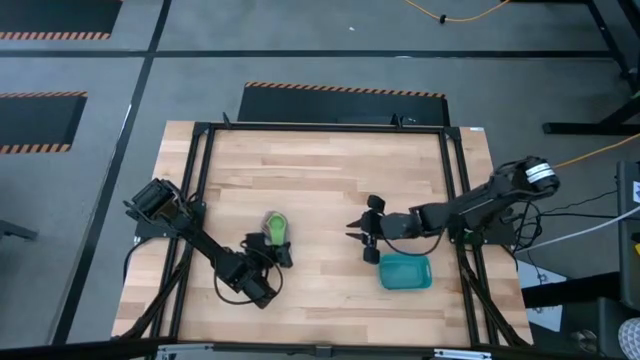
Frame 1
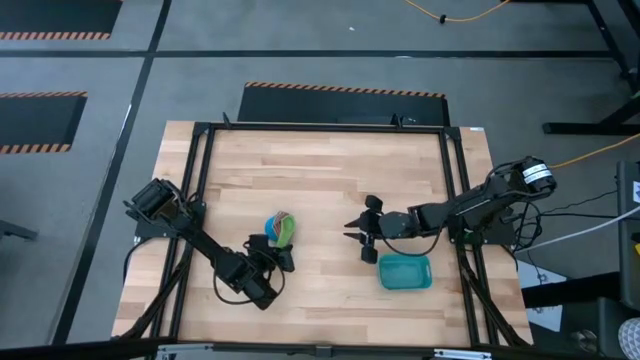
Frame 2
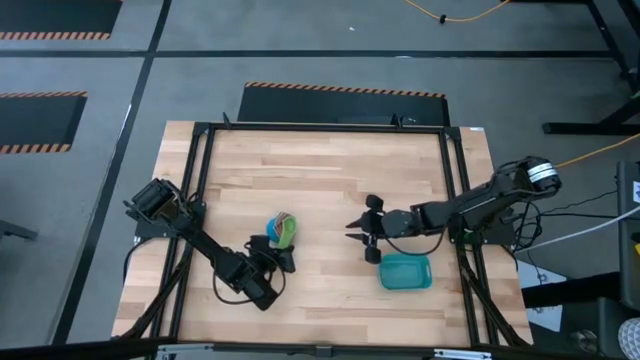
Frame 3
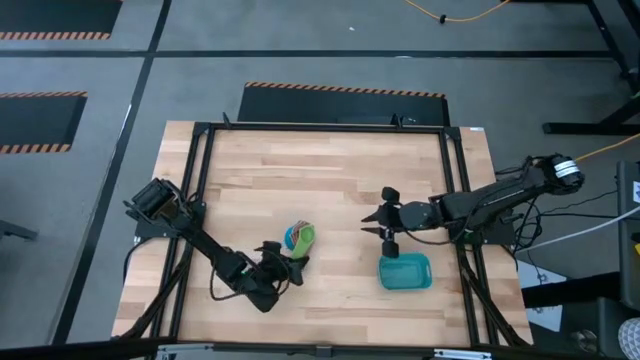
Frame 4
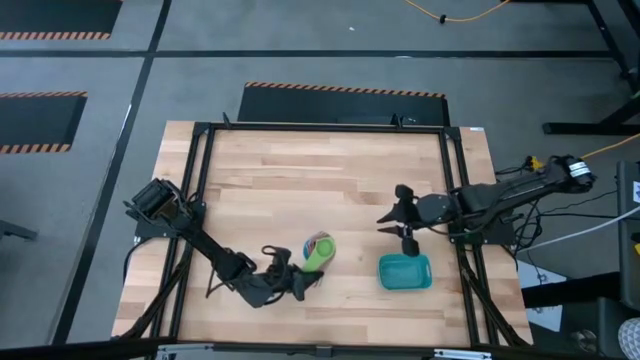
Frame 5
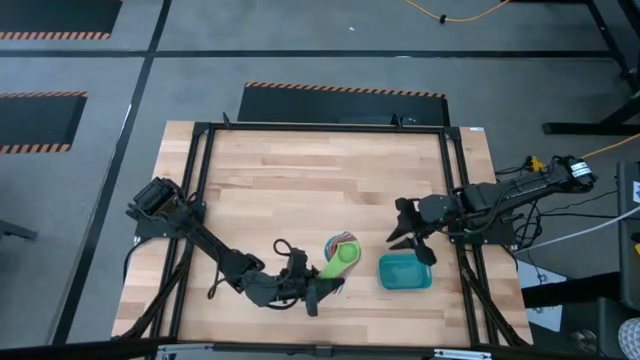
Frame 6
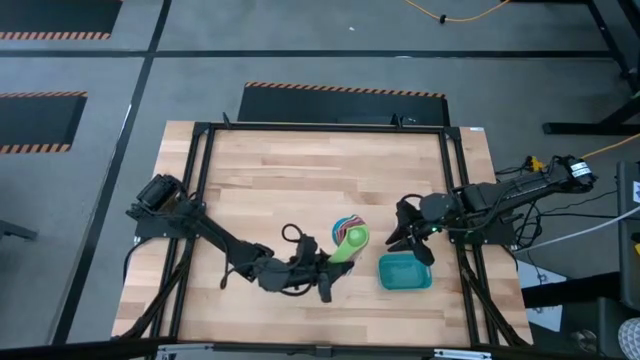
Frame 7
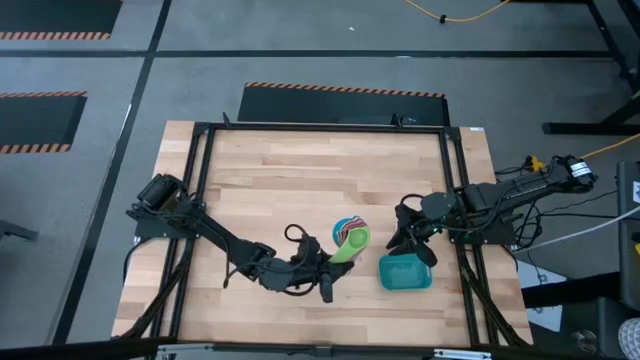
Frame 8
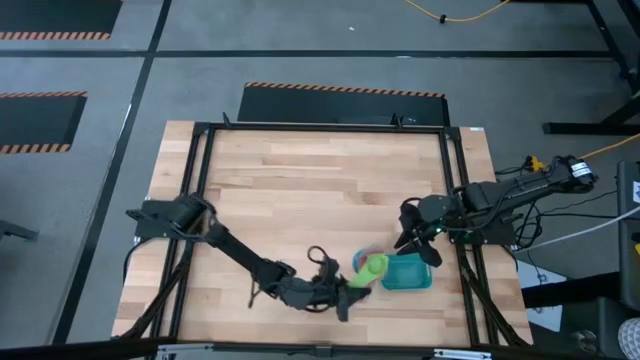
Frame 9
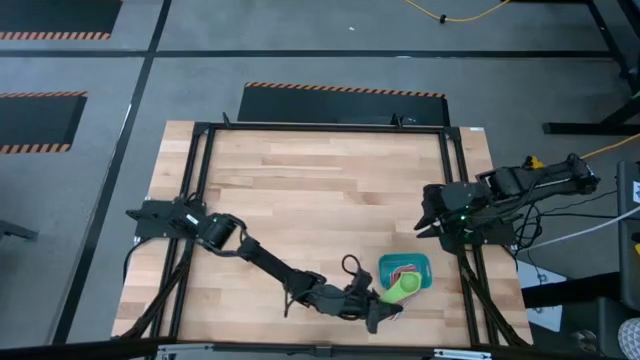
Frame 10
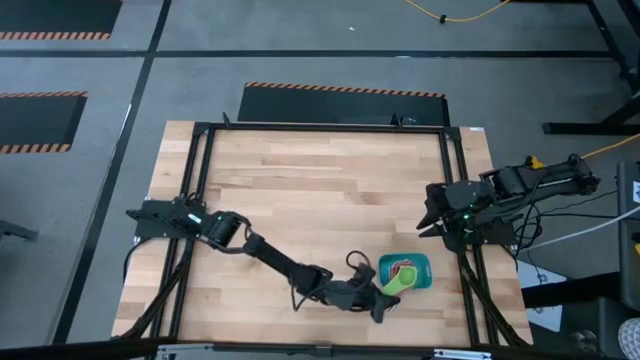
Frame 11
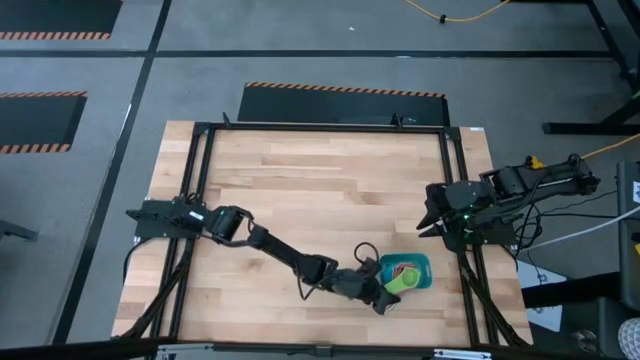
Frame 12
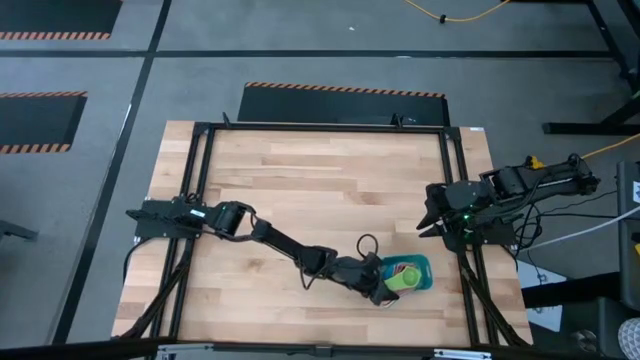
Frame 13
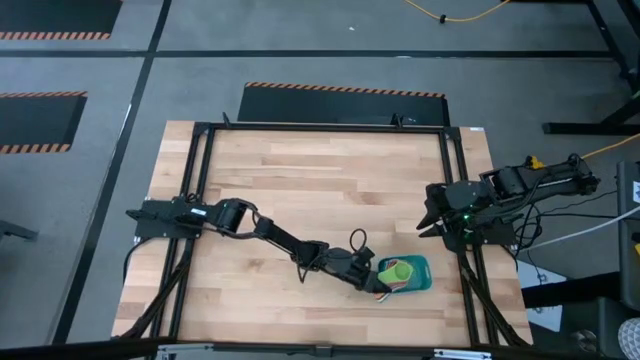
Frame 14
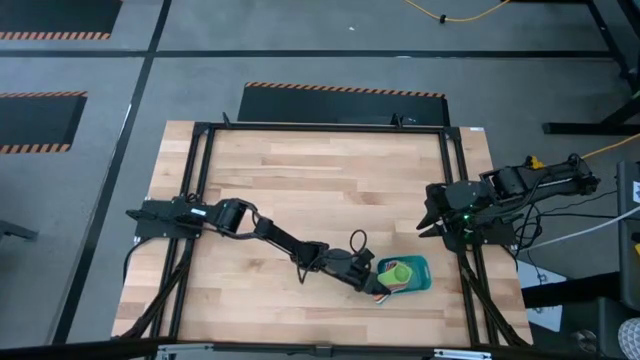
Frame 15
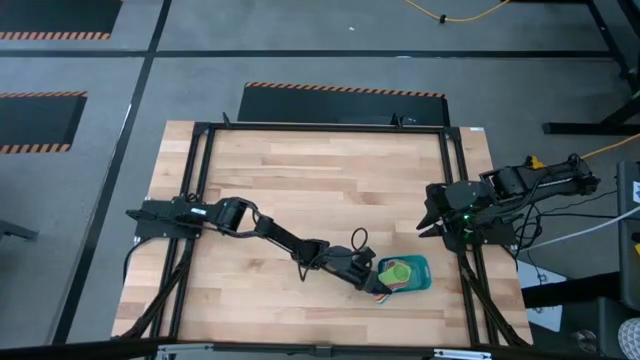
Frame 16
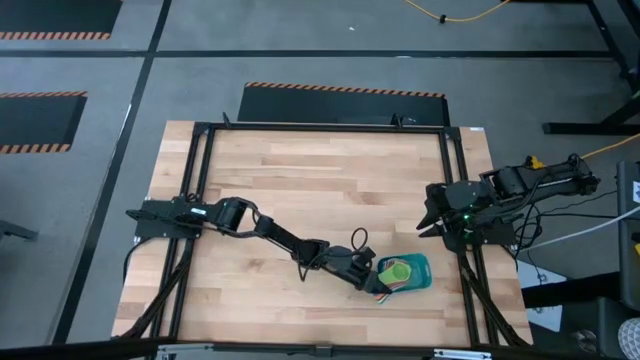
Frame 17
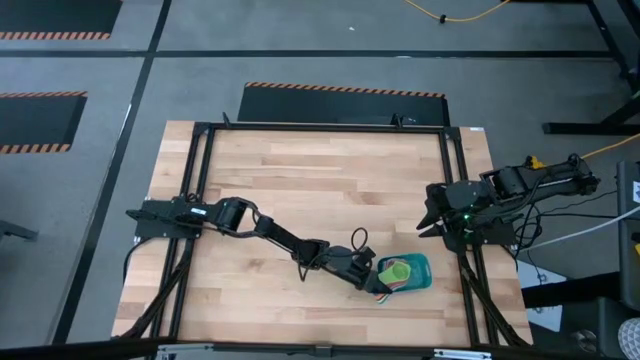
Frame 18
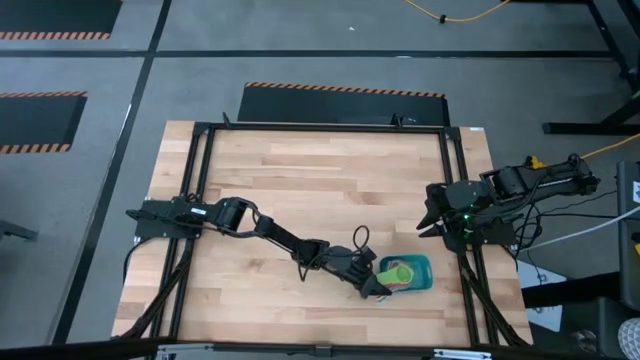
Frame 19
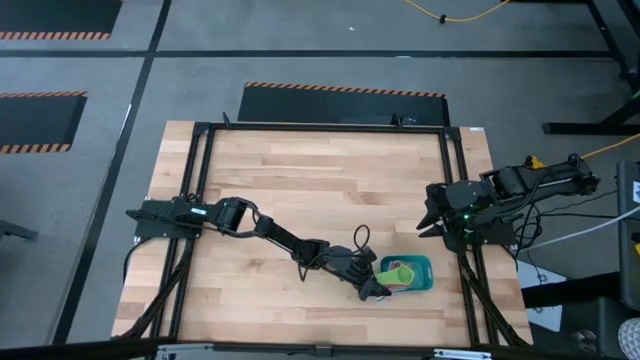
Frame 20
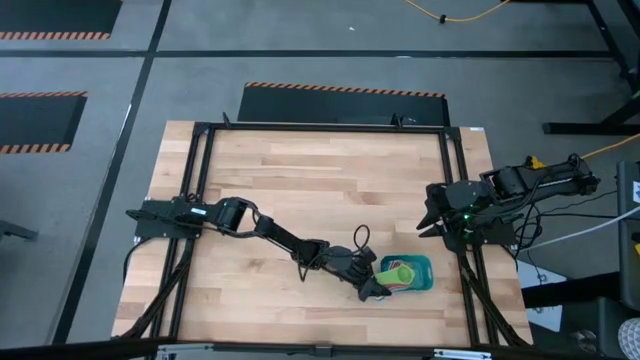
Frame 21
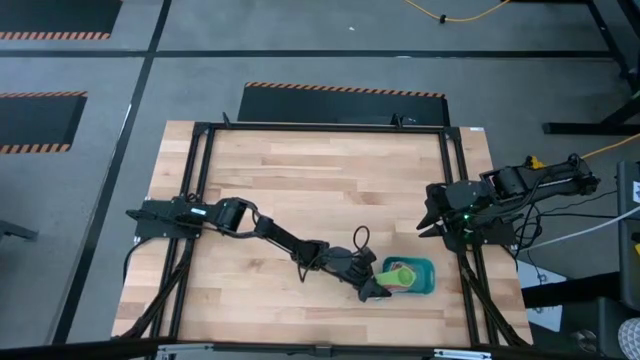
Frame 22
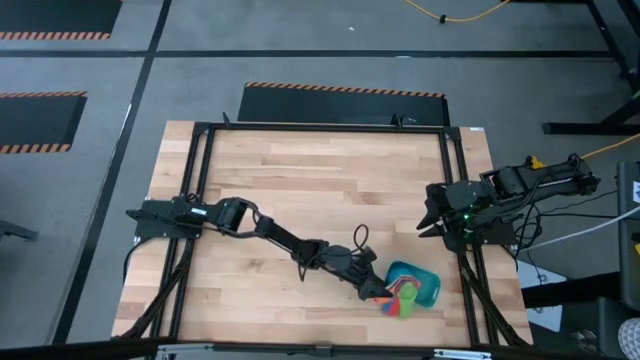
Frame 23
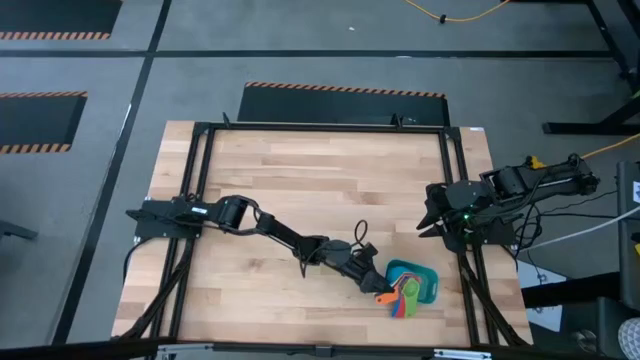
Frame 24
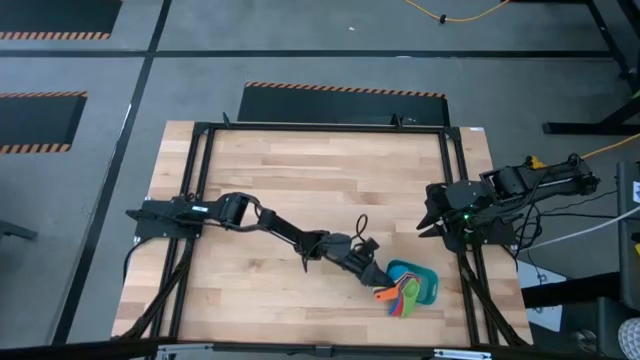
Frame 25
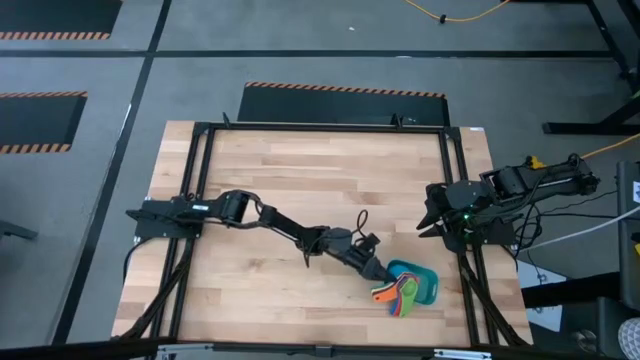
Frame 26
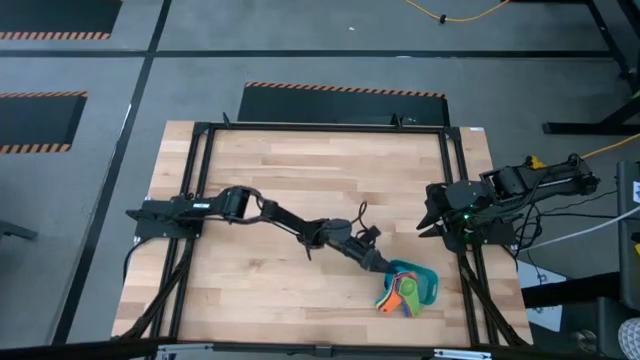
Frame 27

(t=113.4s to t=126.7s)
Task: Nest measuring cups in basket
Put the stacked nesting measuring cups into the blue bin

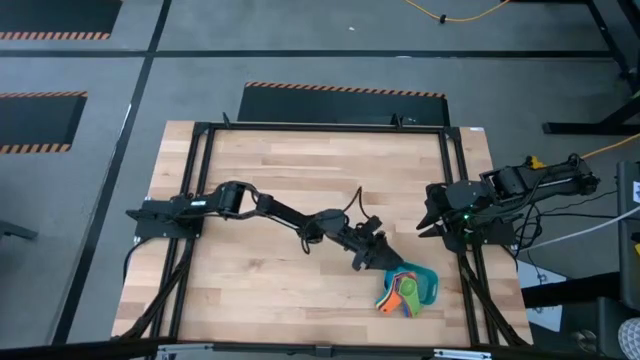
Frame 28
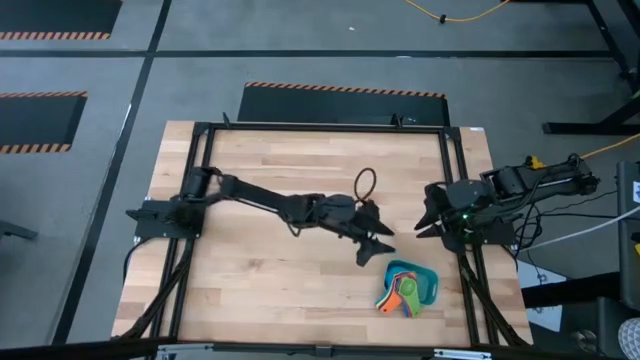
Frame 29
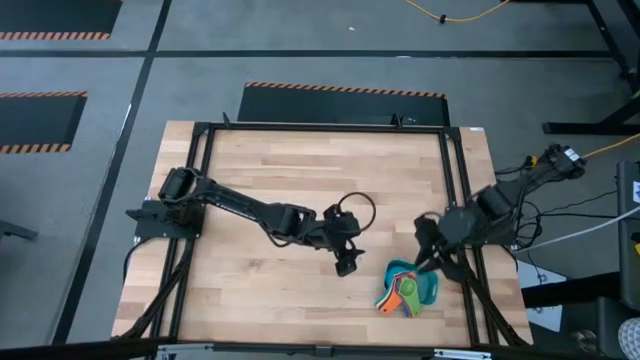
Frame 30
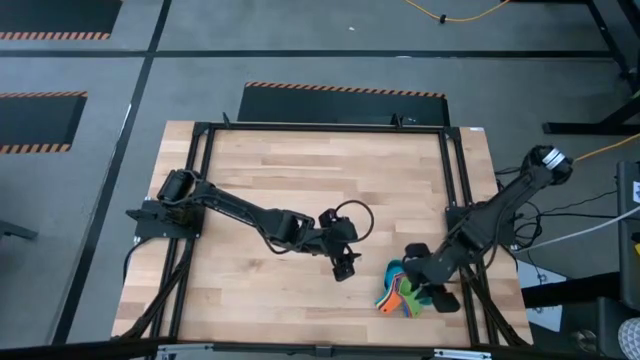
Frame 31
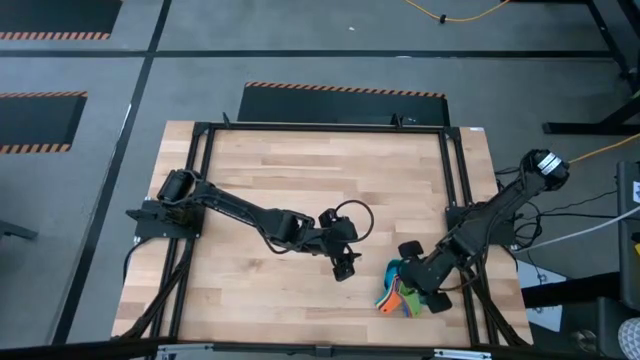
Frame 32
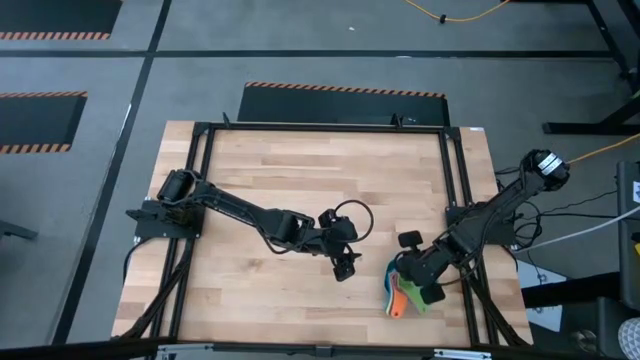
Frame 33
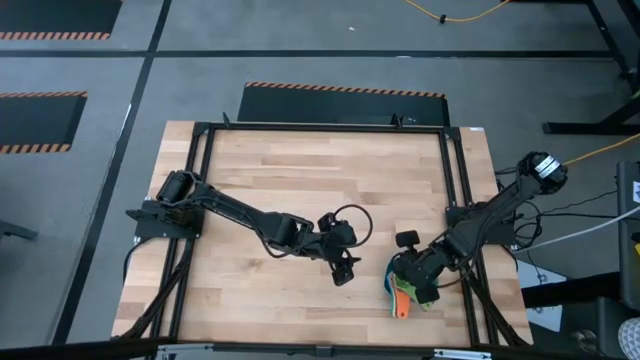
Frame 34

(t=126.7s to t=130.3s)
Adjust the stacked nesting measuring cups on the bin

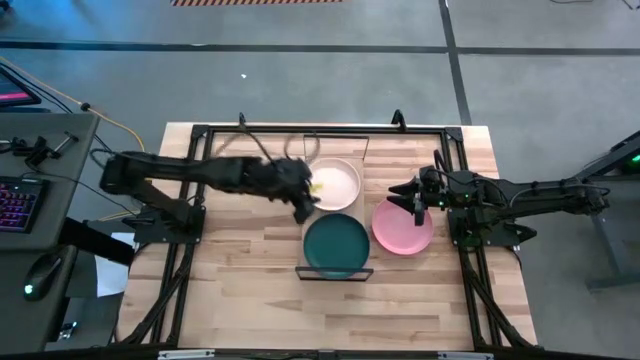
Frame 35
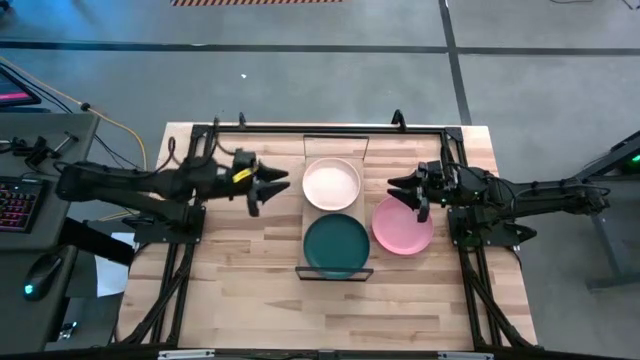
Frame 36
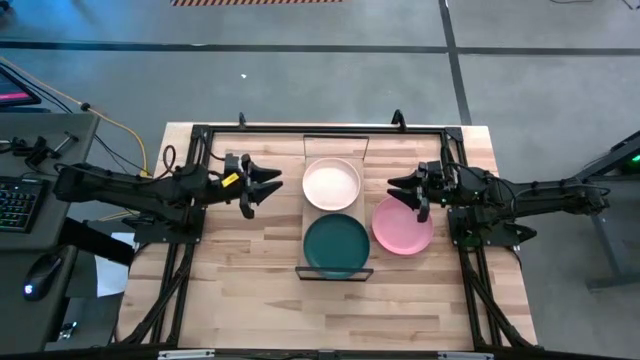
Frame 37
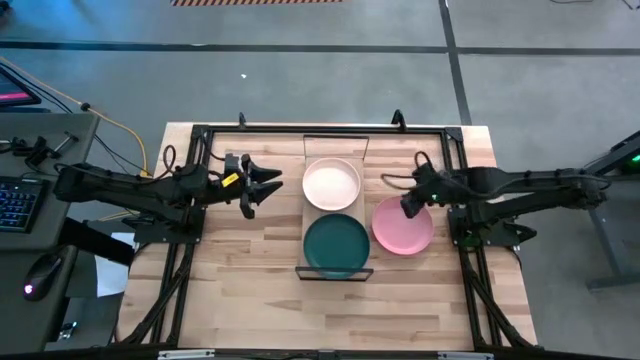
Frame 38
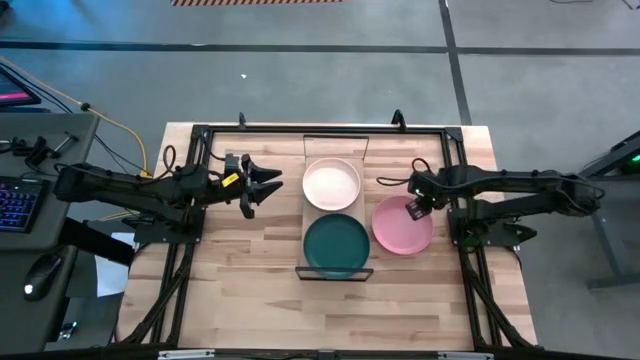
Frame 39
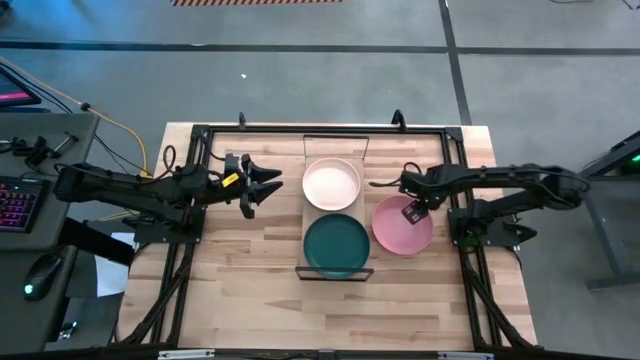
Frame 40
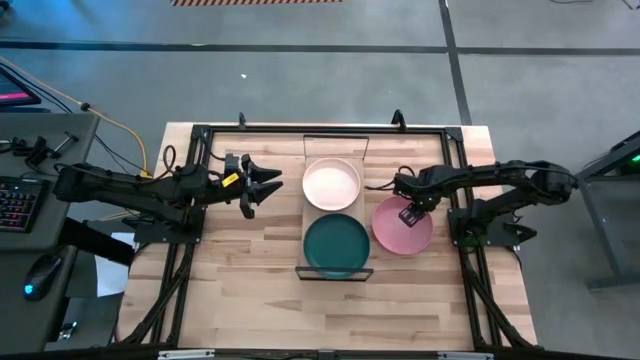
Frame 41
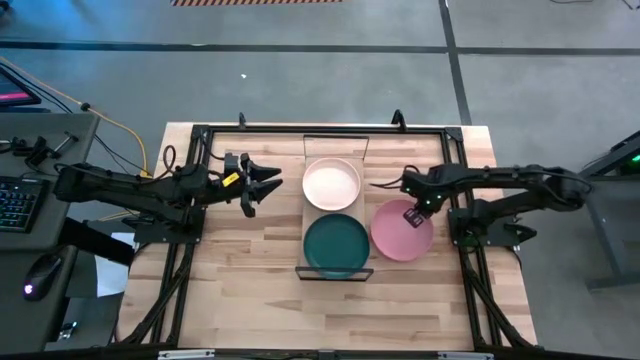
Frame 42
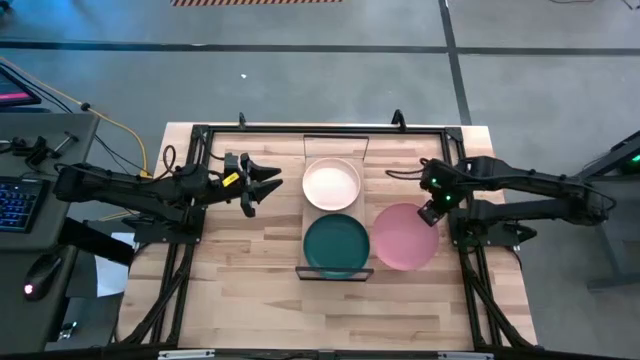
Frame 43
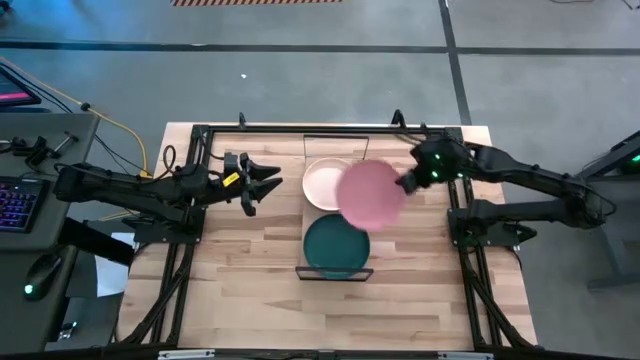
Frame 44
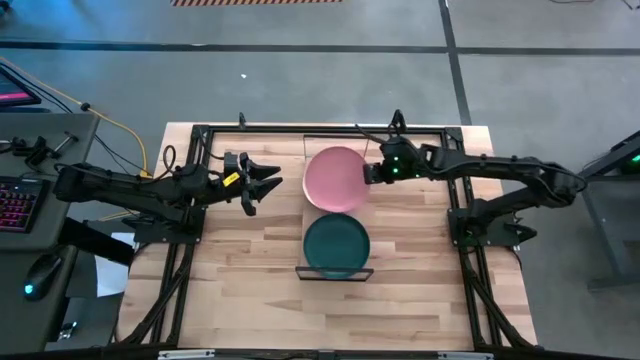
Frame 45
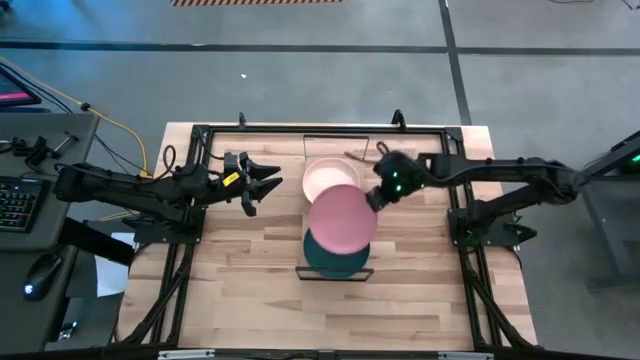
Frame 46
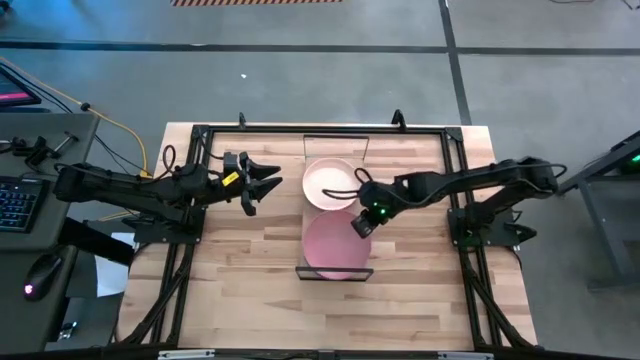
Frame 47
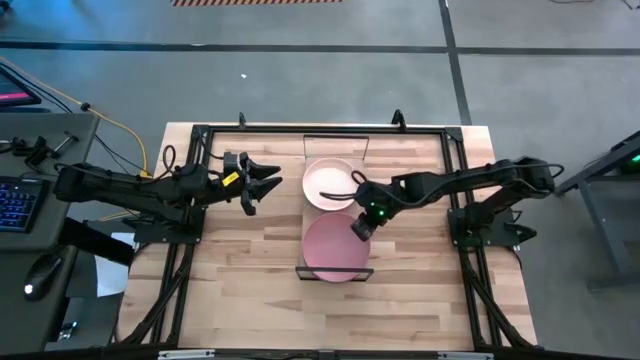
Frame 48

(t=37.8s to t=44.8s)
Task: Place and stack plates onto a shelf
Stack the light pink plate on top of the green plate on the shelf
